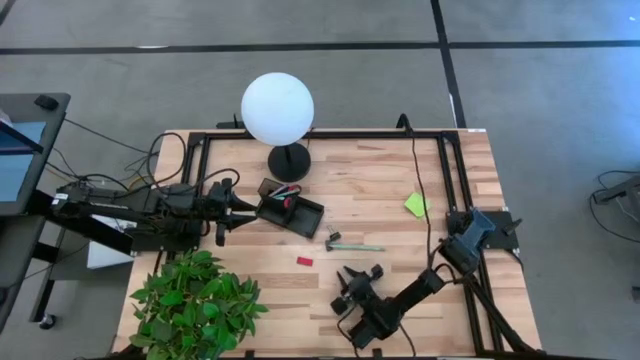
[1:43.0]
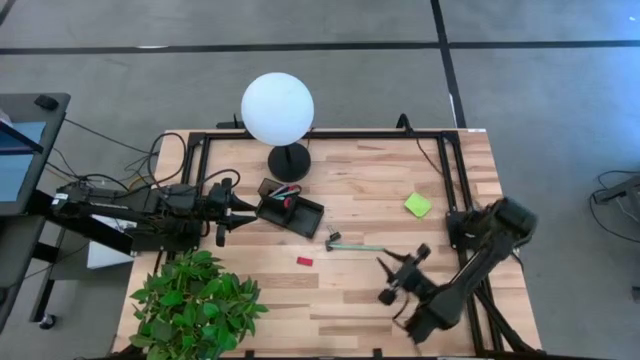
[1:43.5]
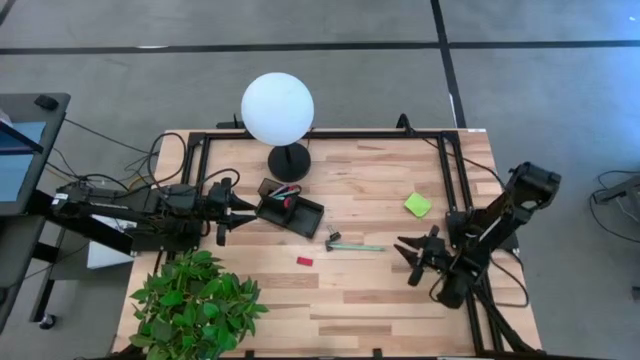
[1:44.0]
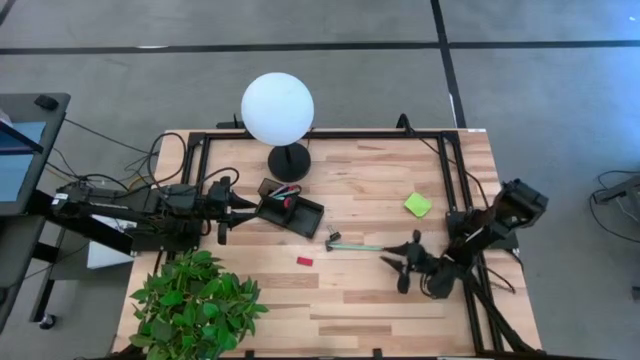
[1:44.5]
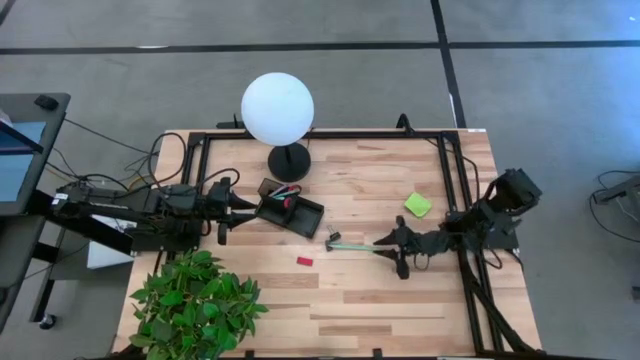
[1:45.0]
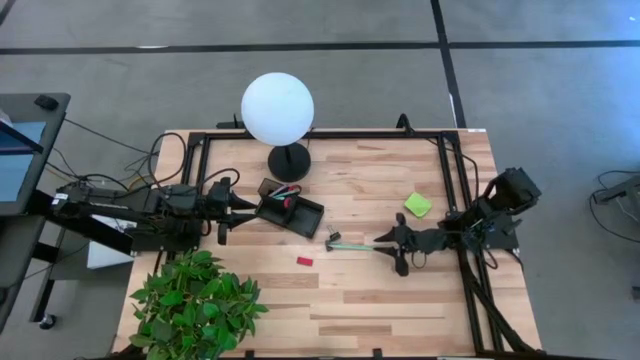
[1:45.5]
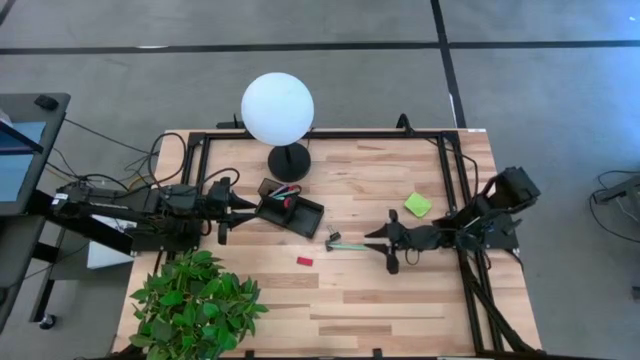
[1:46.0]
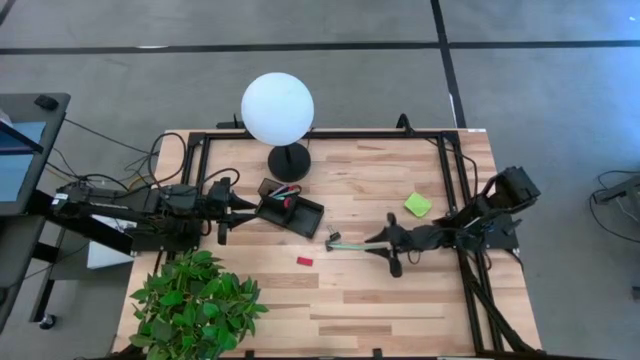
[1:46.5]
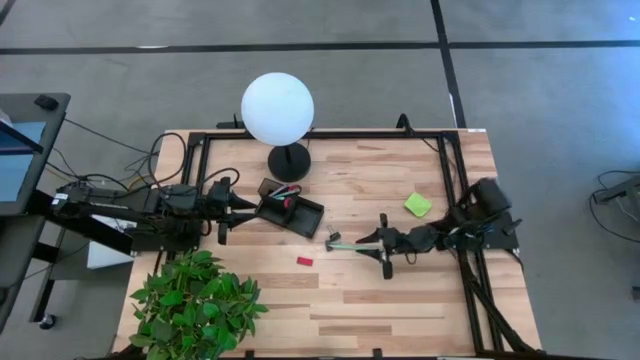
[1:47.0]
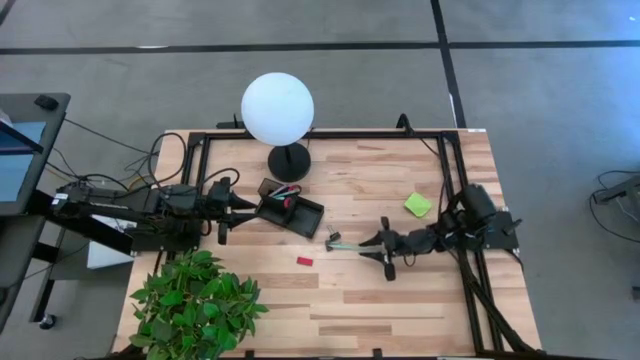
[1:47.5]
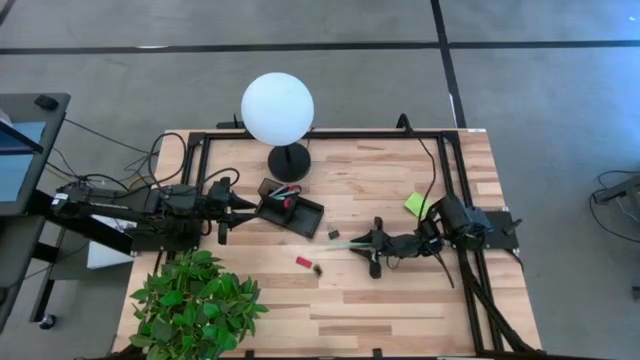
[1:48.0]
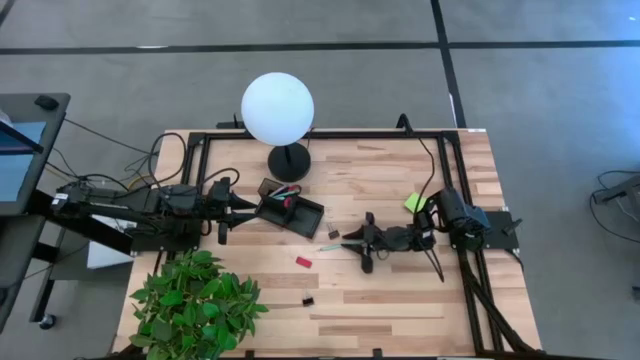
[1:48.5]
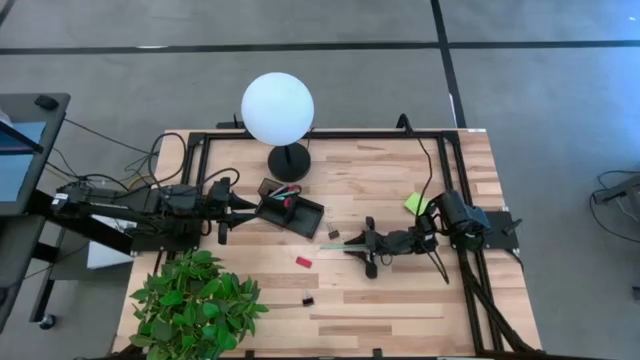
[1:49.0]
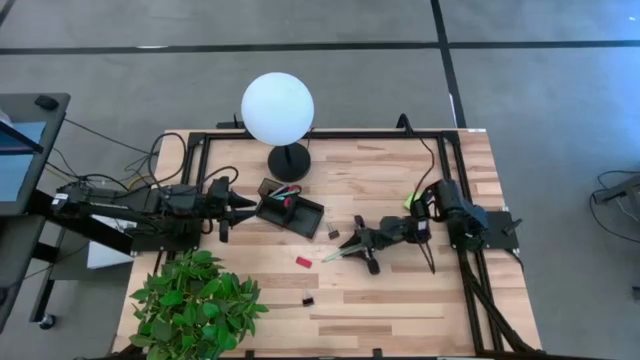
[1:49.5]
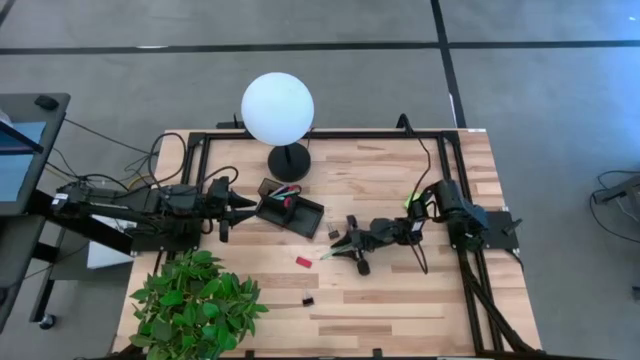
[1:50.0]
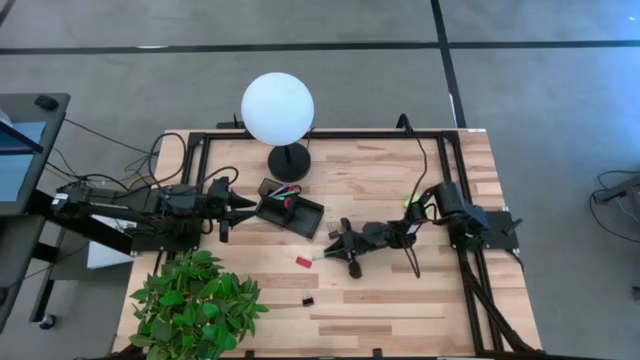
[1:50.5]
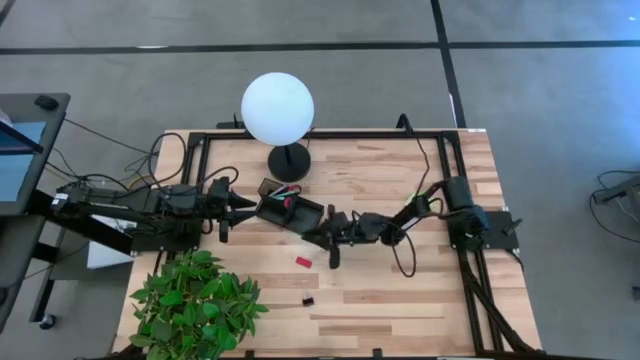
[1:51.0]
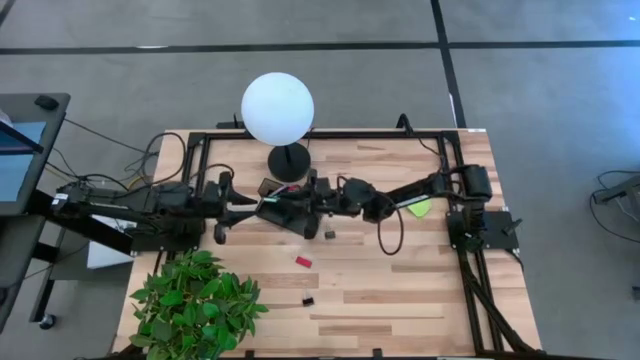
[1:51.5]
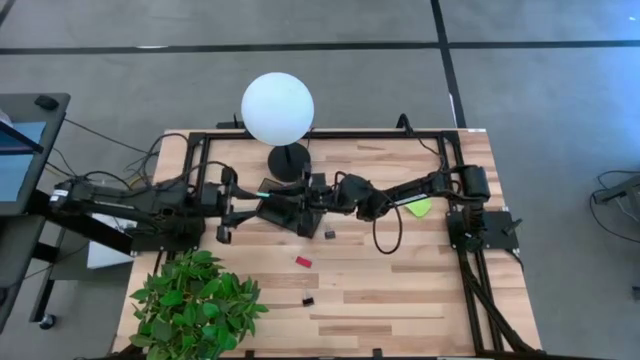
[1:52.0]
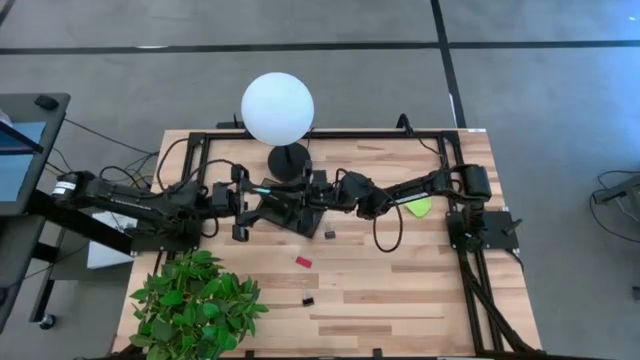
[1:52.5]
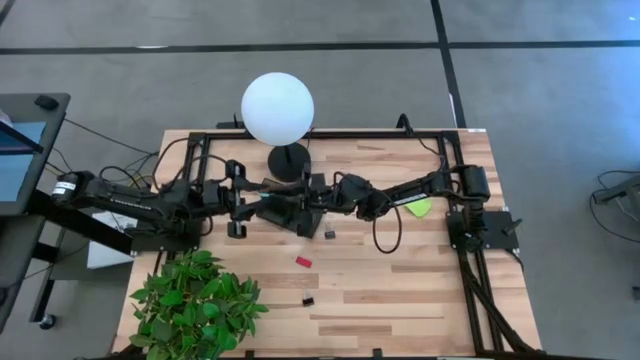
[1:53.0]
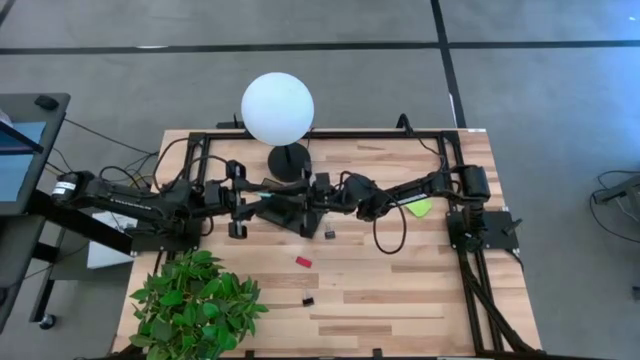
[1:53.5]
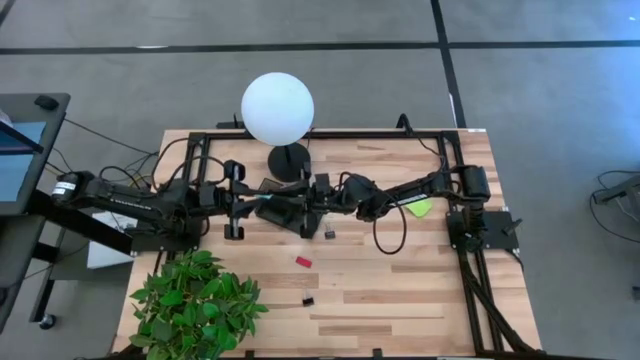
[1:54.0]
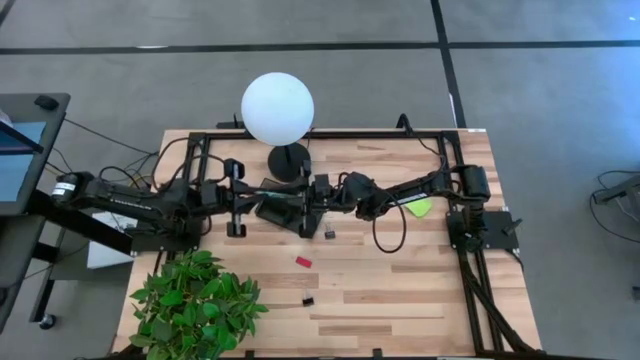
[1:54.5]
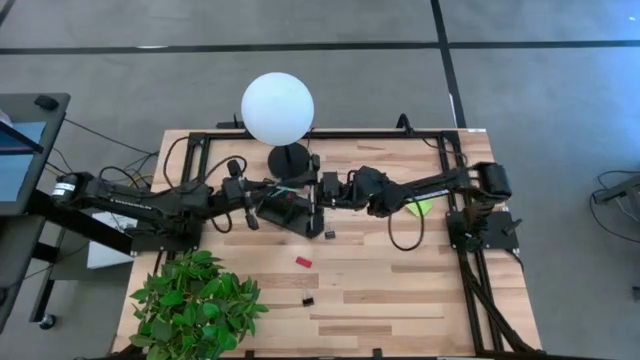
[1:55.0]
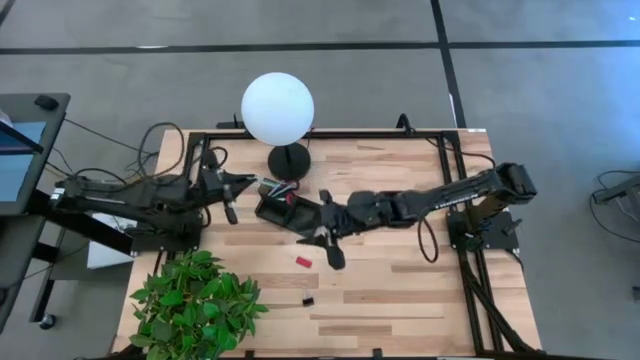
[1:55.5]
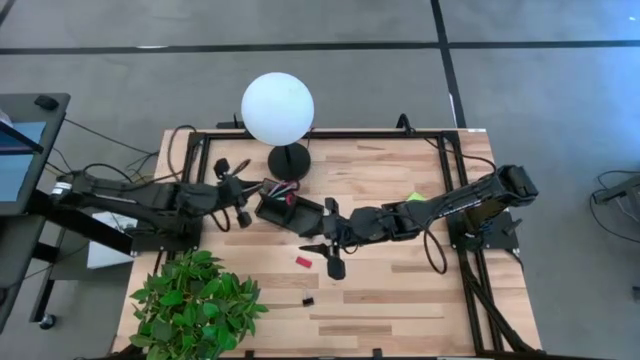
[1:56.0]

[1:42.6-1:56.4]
Task: Pick and place office supplies into organizer
Put the blue pencil into the black desk organizer

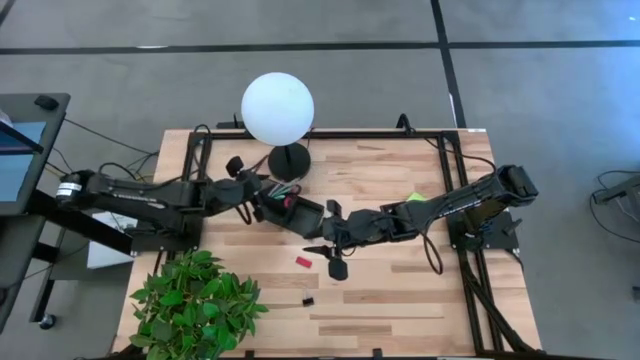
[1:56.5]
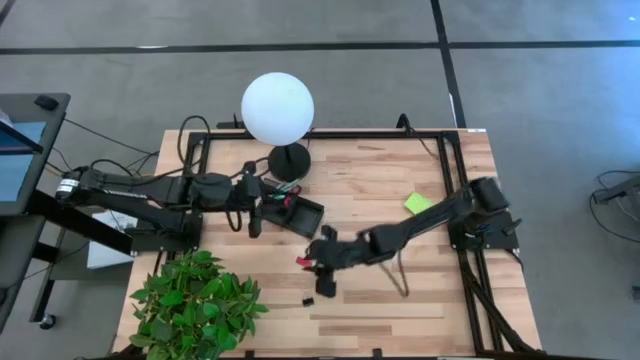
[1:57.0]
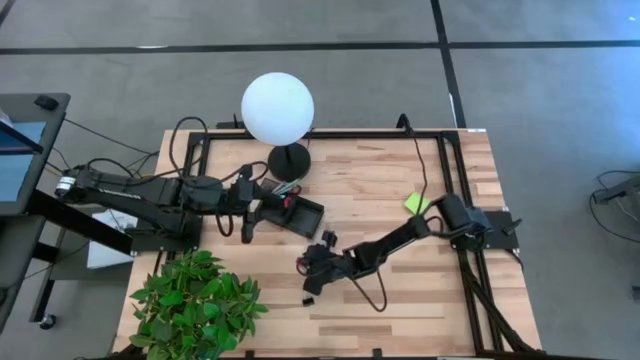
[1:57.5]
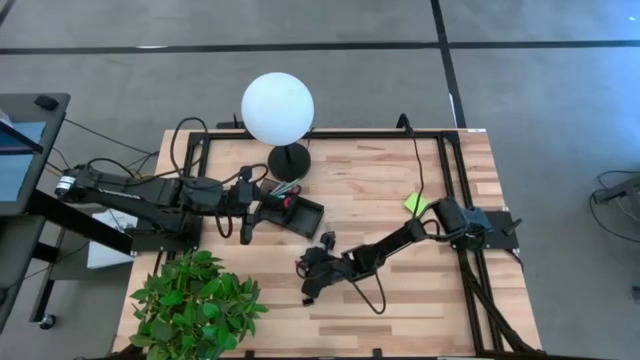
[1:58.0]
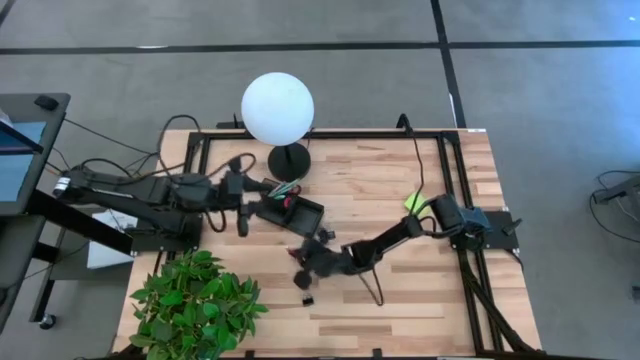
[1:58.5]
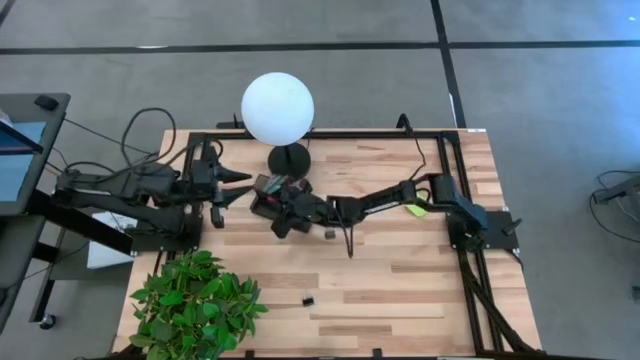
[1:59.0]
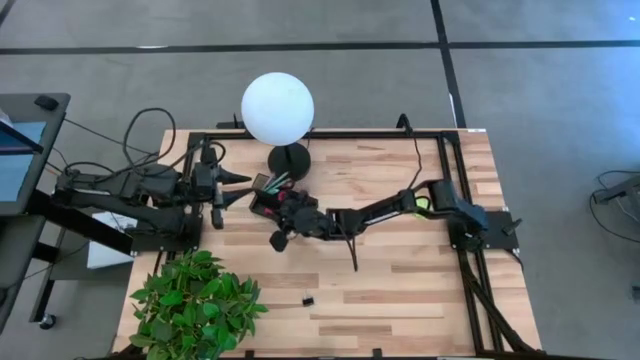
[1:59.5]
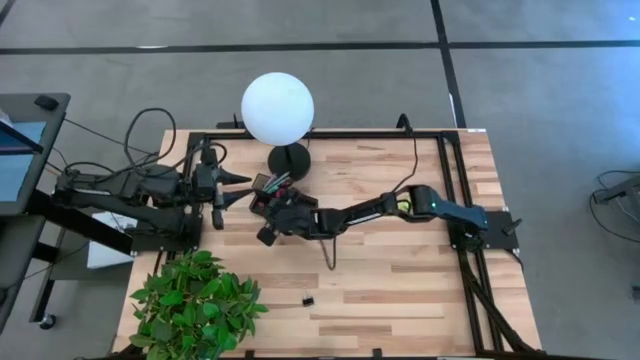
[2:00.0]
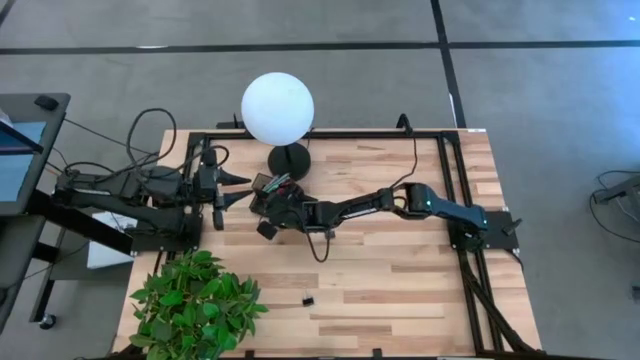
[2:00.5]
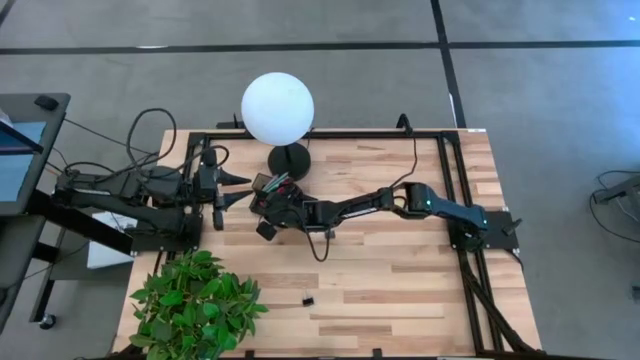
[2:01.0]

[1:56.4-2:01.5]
Put the red eraser into the black desk organizer

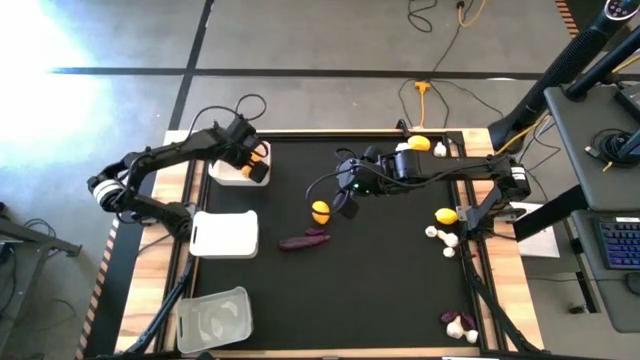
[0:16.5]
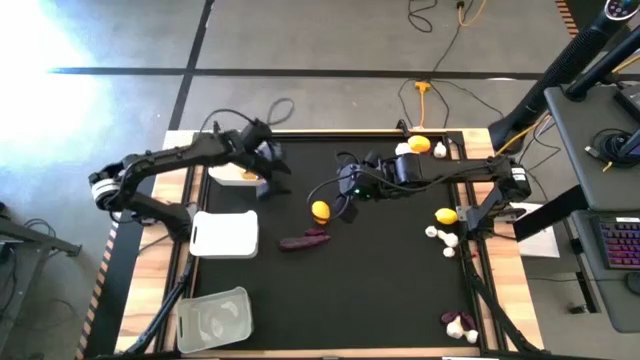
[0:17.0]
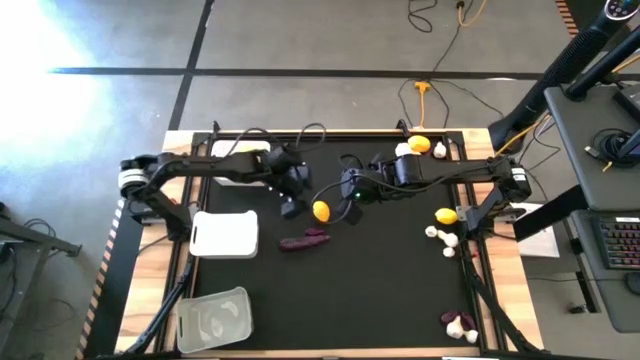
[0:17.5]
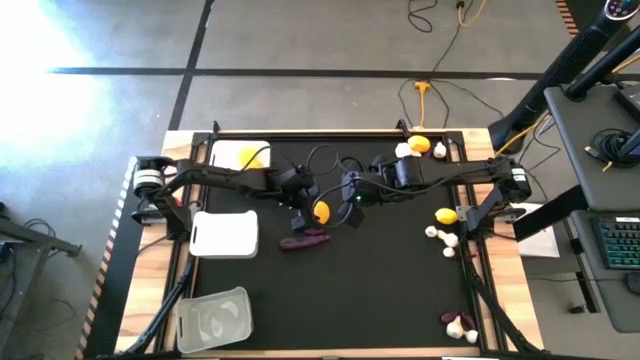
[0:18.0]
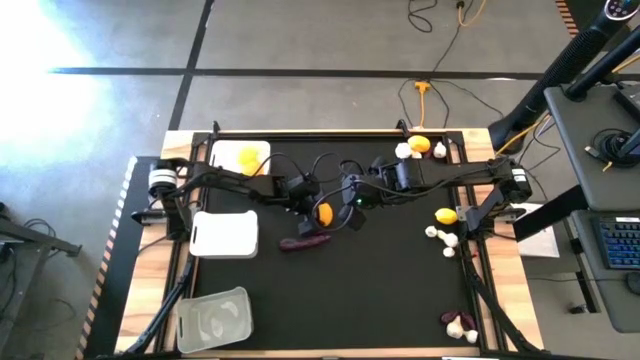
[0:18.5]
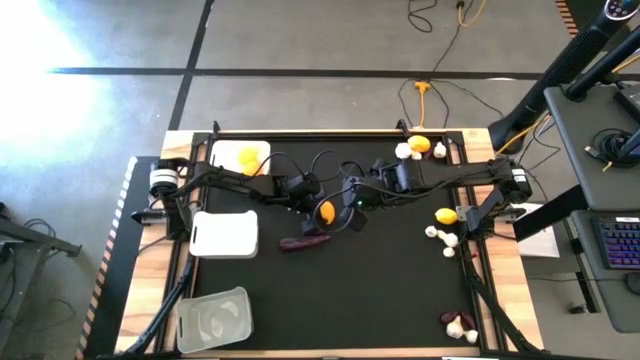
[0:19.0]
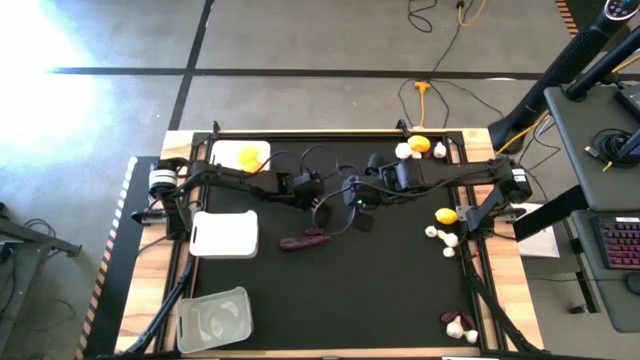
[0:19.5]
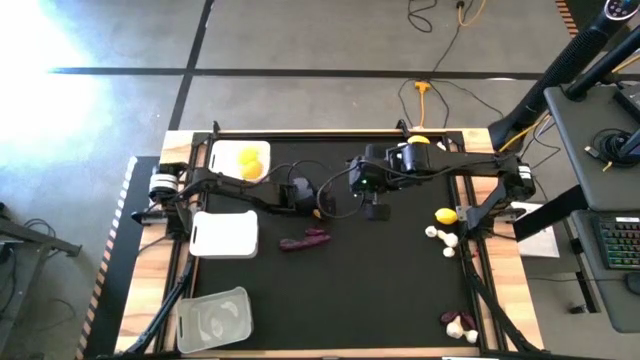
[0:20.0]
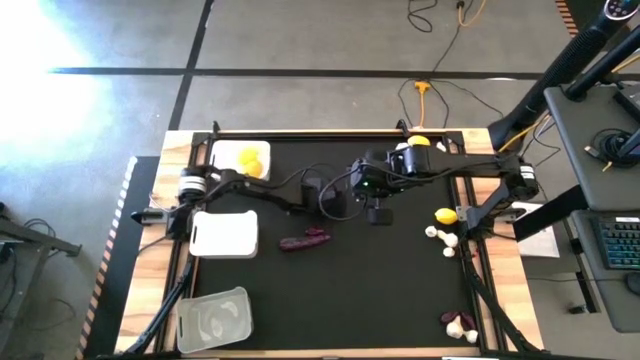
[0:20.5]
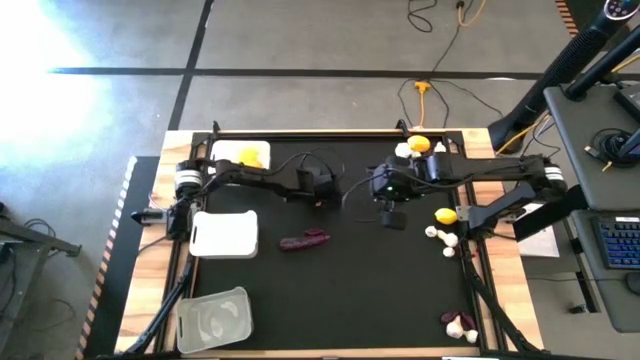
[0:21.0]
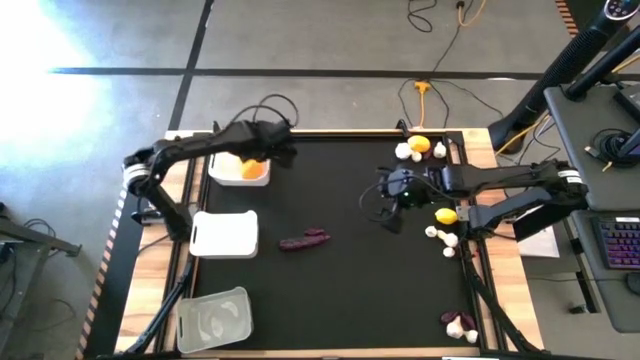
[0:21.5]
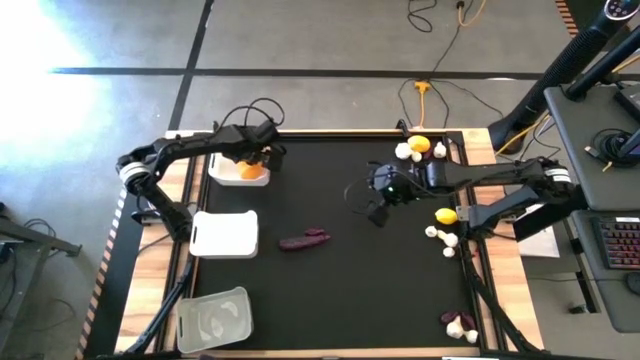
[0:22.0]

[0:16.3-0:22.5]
Task: Sort produce into baskets
Put the lemon into the top white bin
